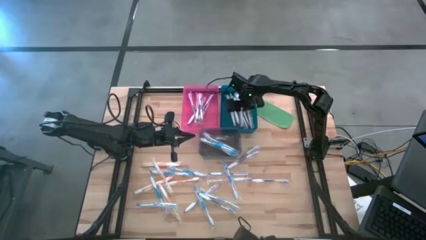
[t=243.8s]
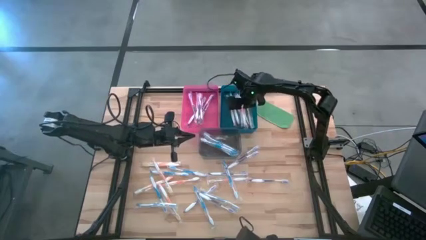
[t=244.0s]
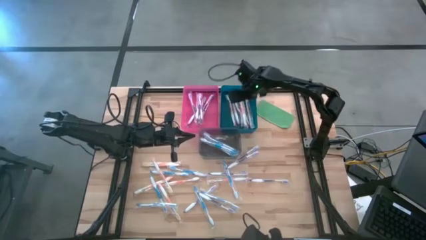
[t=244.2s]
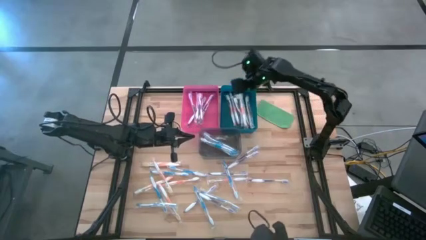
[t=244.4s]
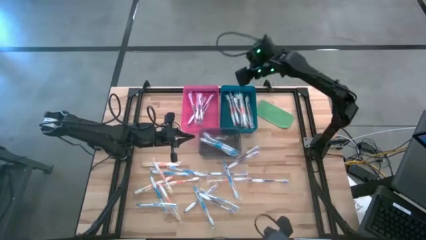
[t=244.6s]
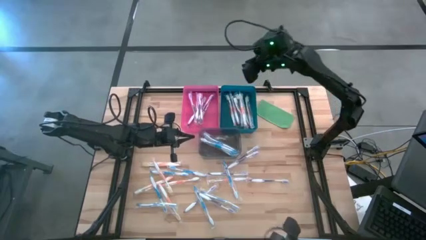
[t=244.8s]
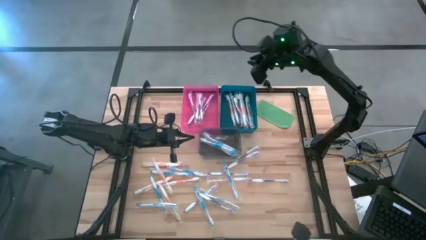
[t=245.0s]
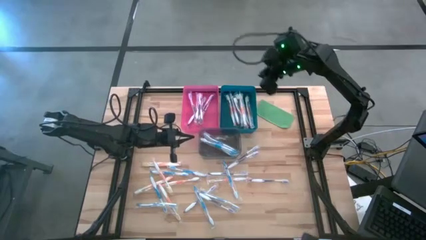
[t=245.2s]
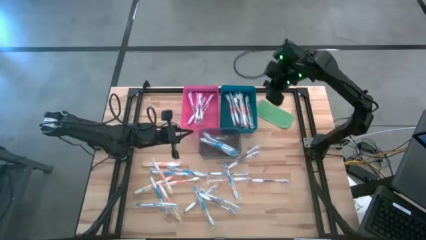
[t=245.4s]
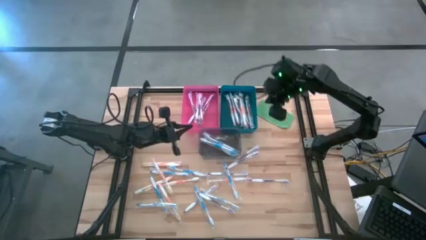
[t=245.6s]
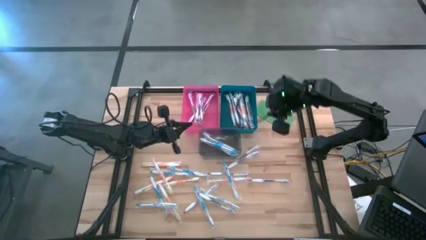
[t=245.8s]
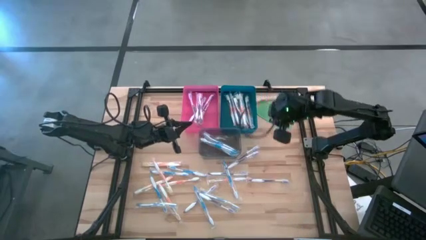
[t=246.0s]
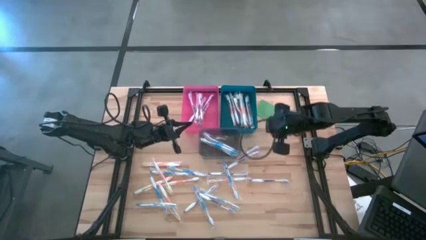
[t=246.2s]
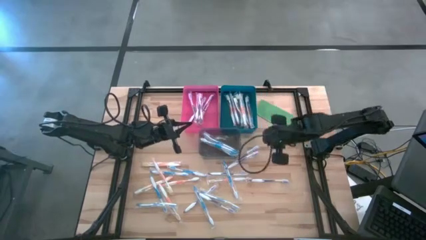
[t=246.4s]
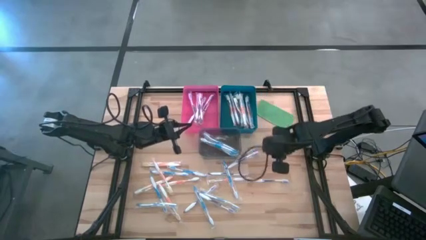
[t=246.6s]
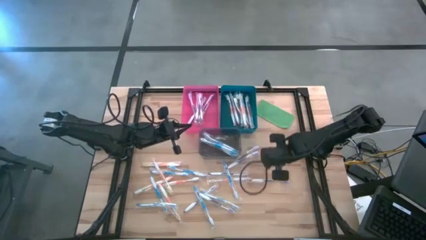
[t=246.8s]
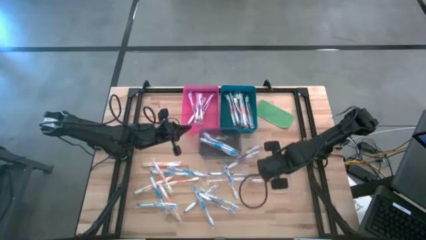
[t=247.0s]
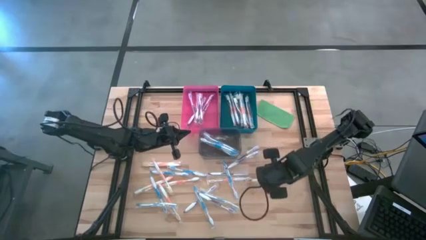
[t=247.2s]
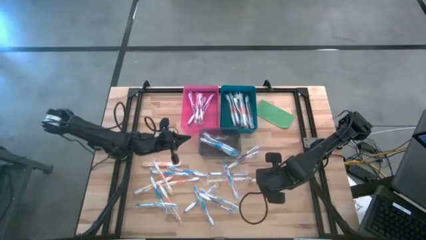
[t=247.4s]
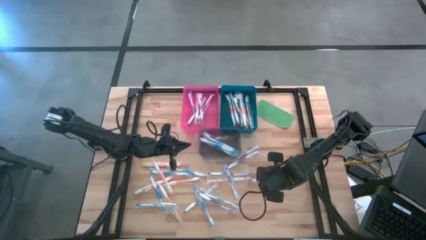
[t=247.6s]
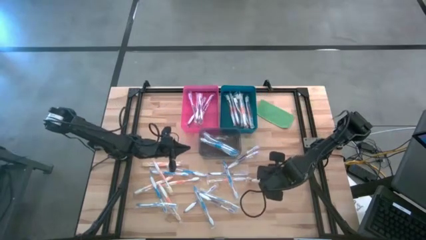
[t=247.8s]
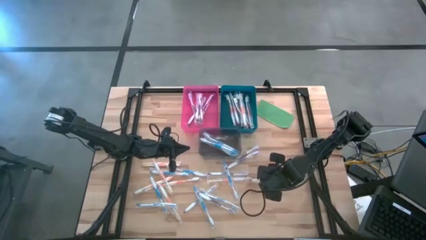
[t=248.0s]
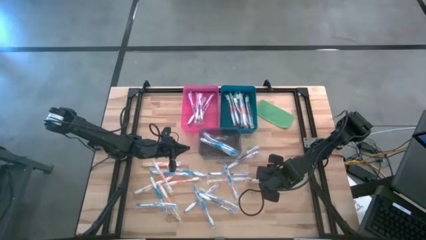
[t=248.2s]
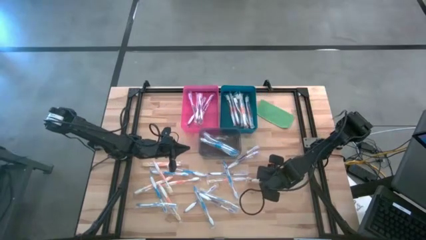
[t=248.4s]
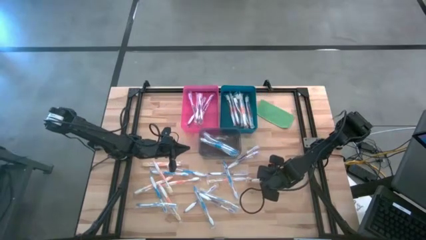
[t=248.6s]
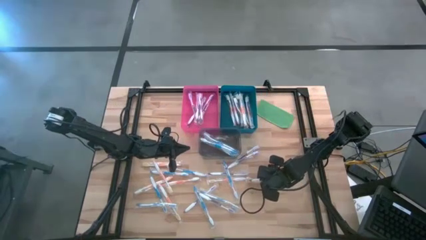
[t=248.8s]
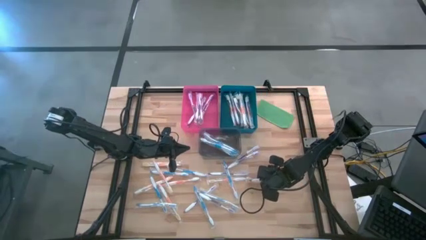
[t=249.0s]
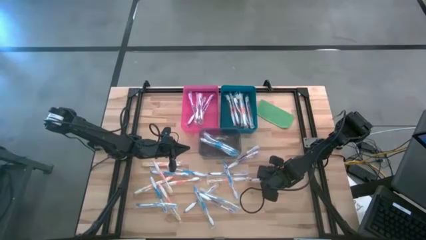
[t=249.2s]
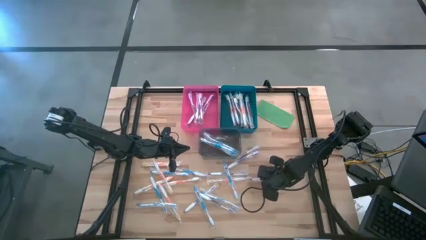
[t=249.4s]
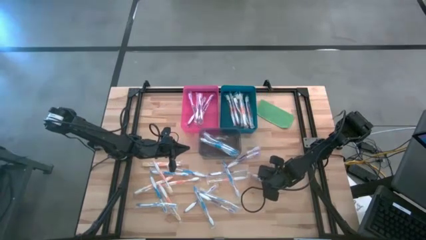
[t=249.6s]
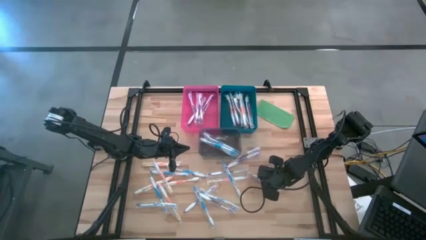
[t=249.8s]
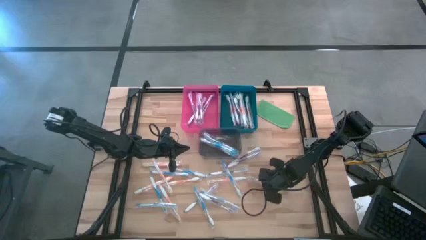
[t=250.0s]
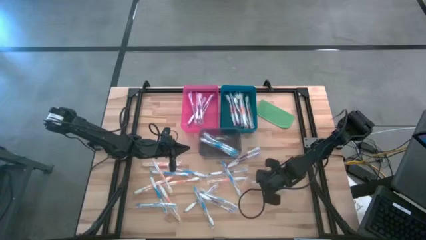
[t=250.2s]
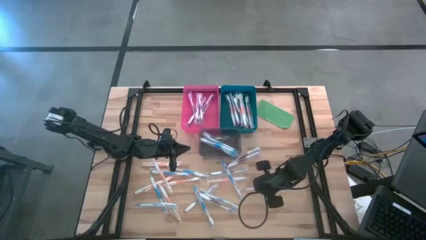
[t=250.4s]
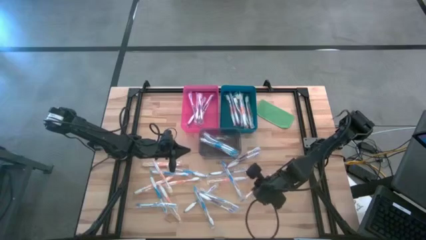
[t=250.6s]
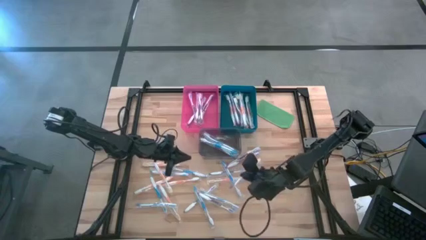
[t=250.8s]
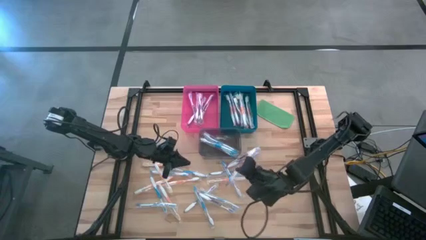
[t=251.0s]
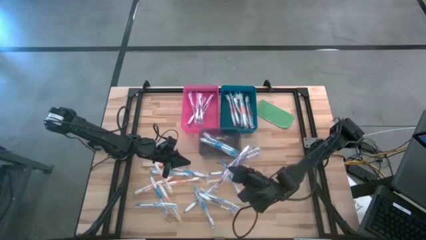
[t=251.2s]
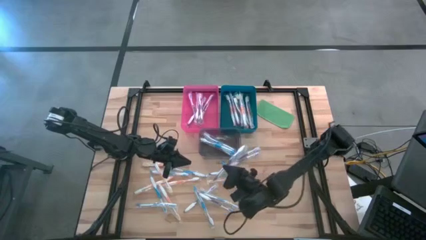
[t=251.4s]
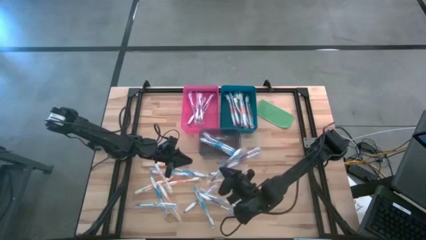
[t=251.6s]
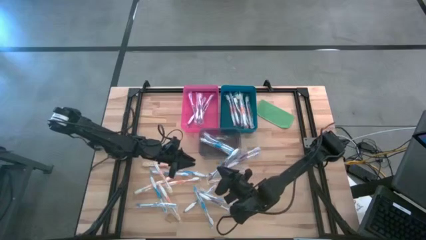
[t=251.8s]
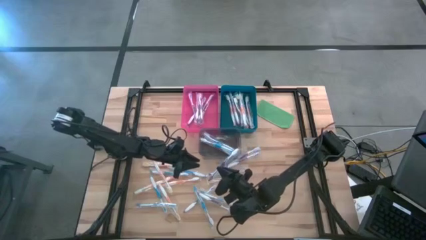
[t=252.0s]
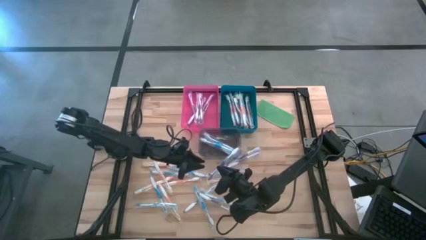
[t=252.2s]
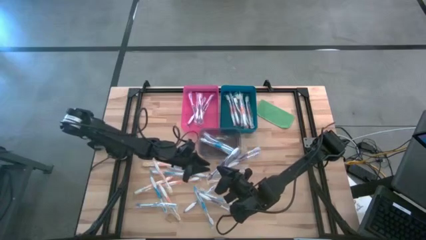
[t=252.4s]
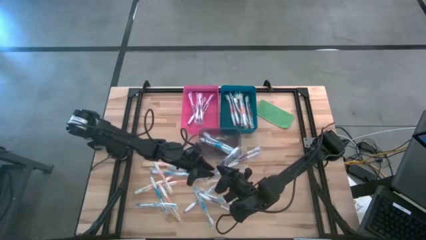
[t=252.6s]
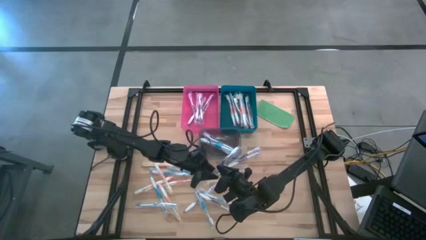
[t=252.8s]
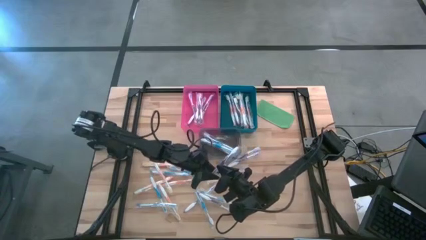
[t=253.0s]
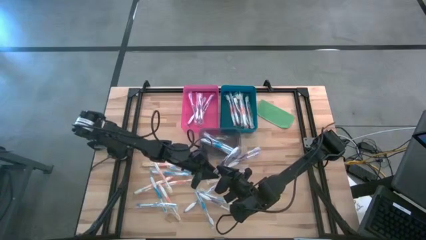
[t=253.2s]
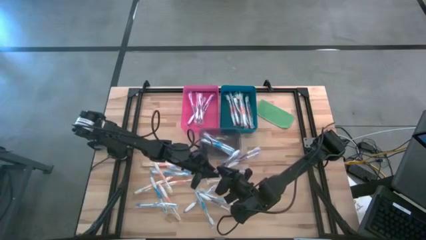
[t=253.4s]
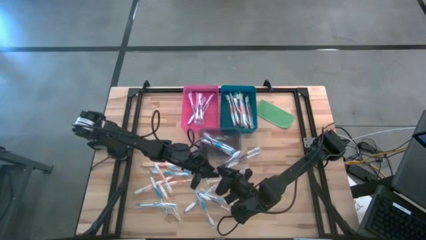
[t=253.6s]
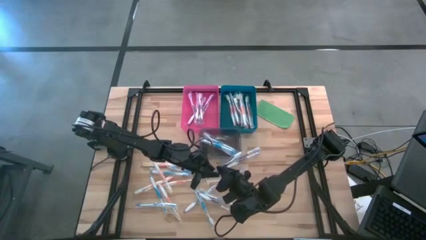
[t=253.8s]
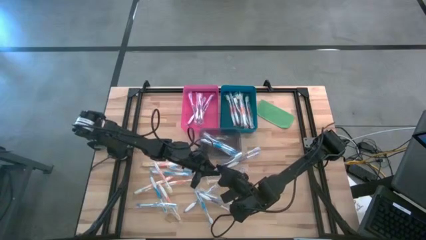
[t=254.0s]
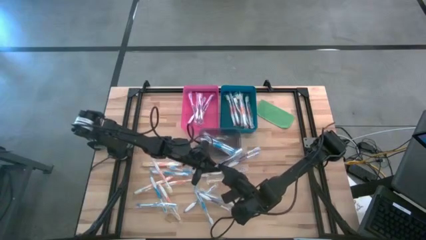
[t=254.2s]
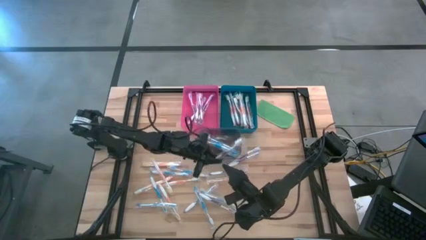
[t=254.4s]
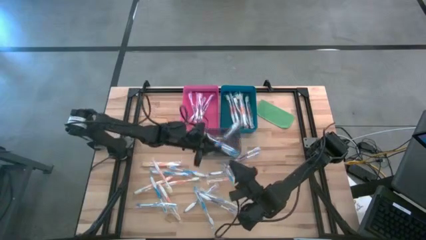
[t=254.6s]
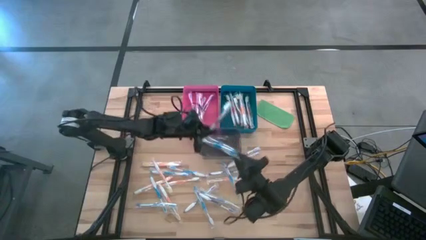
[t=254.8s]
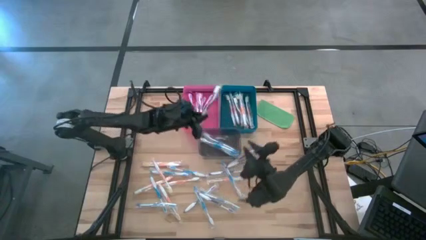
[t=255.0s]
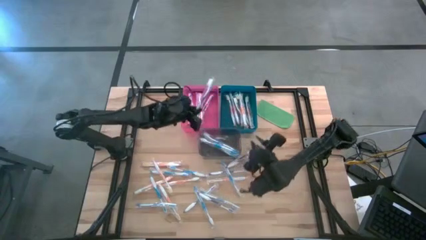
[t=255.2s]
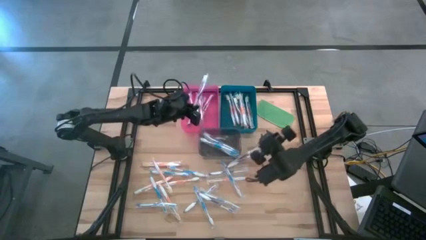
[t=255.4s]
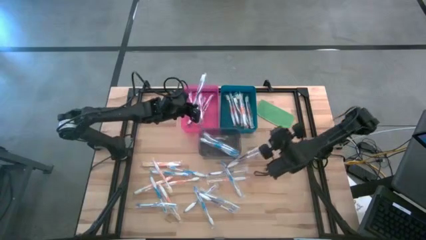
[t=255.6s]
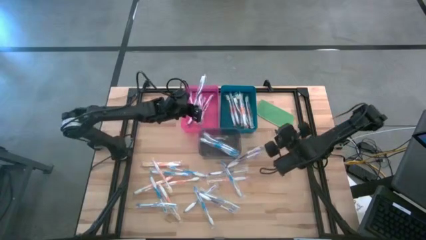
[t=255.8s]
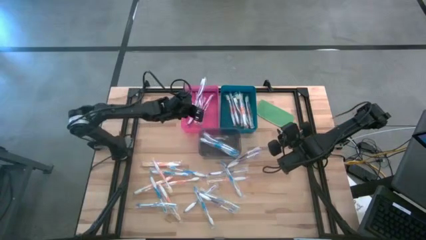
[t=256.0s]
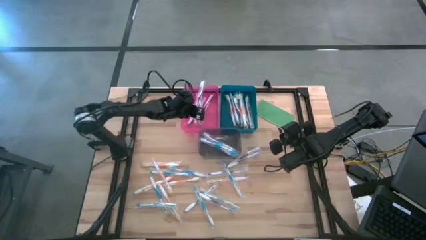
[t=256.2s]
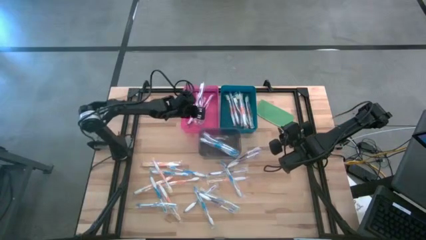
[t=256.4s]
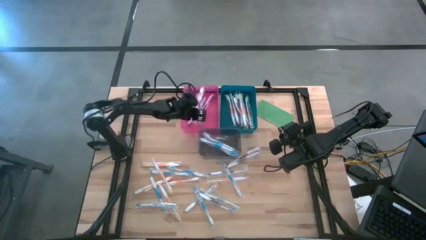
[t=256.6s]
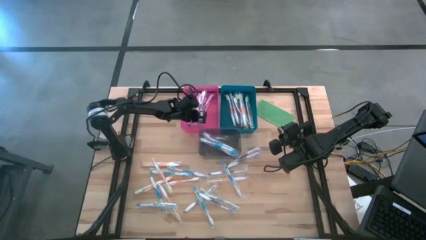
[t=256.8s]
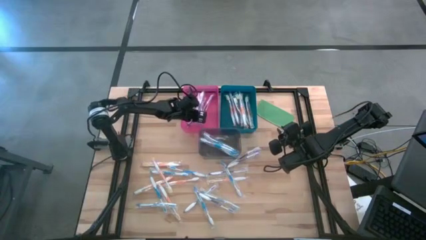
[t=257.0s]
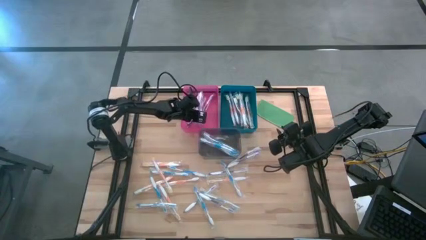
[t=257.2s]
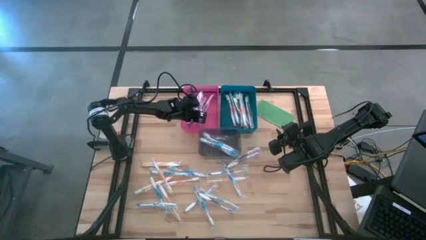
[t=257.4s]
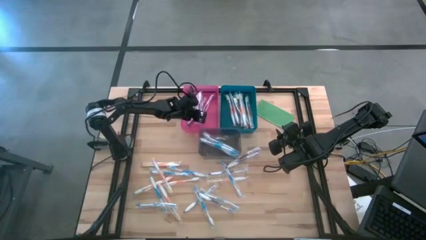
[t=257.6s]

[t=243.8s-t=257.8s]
Task: Pick & Place Toothbrushes
Put the purple toothbrush into the pink bin

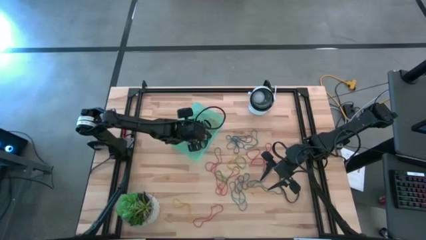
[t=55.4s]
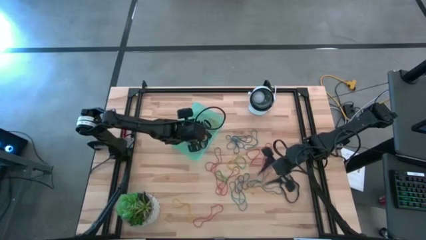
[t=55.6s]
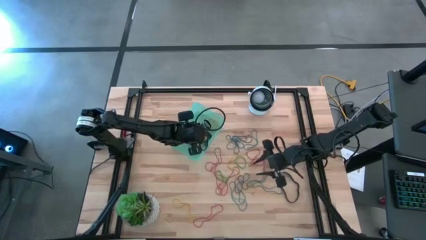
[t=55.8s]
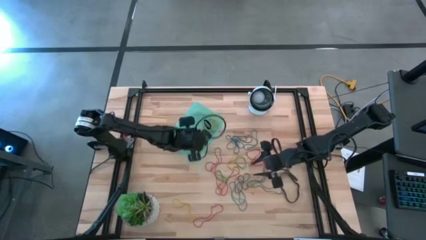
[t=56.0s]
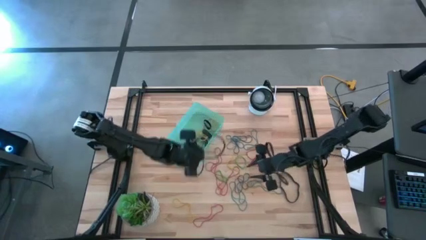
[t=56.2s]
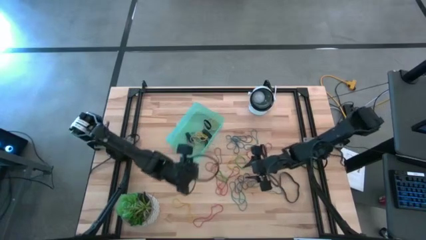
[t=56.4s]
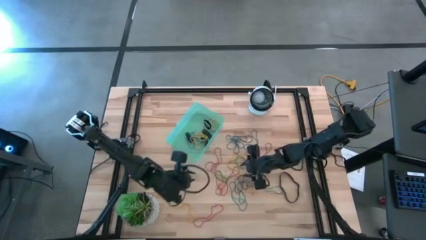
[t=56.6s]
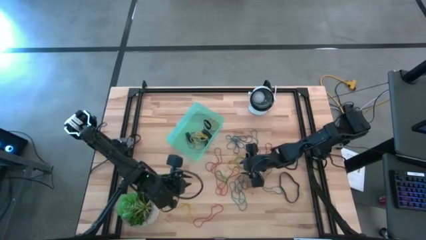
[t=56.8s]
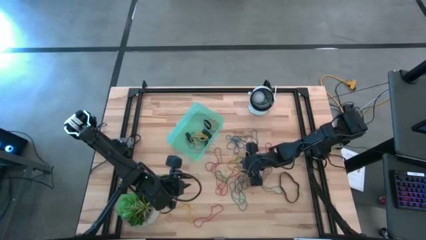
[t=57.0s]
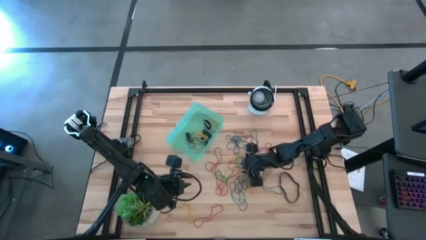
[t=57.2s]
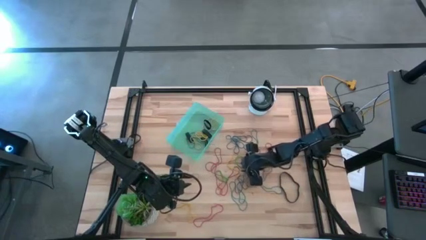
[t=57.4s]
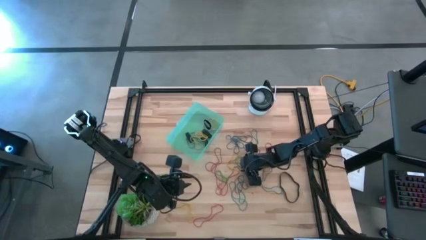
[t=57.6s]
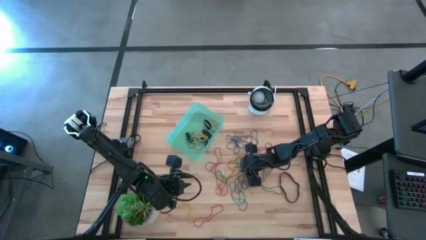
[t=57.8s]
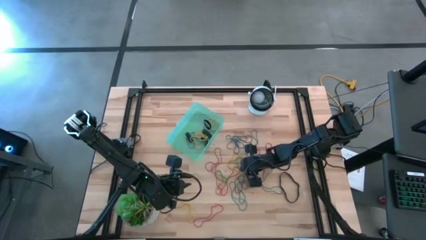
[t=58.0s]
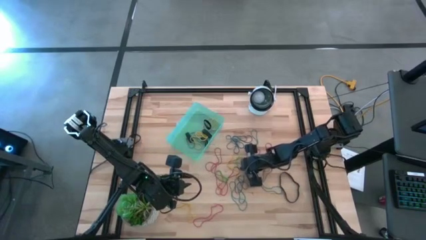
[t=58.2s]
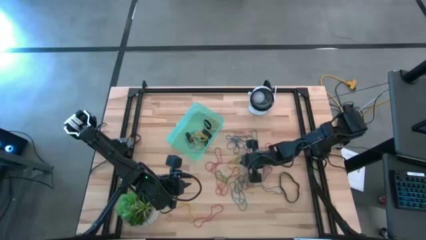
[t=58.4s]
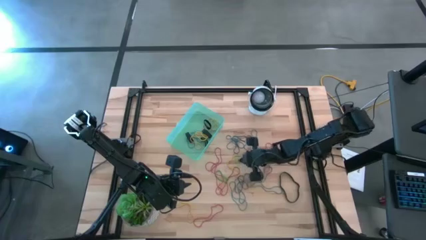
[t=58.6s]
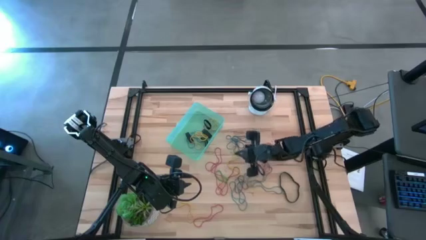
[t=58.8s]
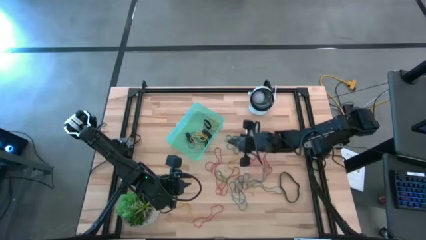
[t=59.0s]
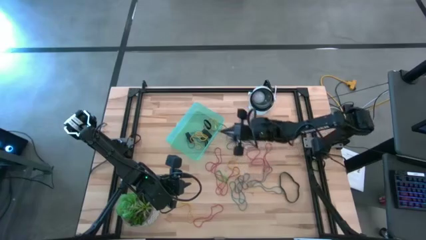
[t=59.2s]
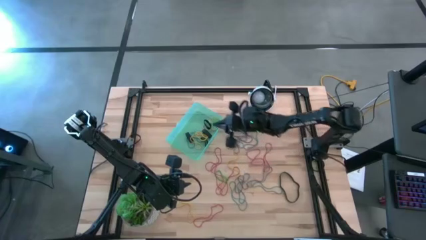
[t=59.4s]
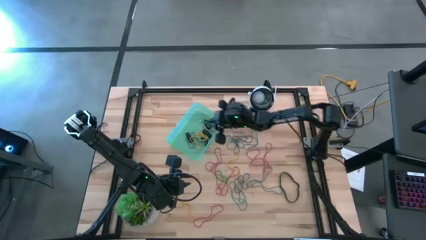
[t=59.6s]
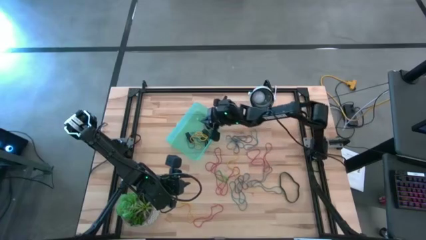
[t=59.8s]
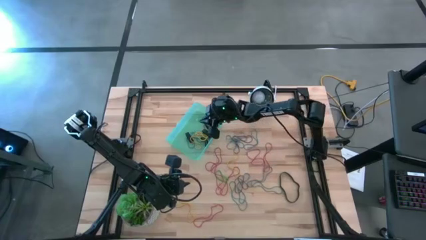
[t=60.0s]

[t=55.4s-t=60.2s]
Task: Pick and place rubber bands into bin
Put the green rubber band into the green bin
